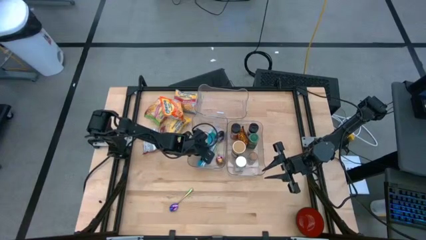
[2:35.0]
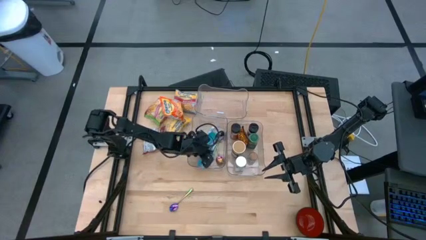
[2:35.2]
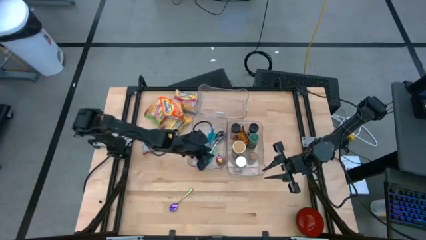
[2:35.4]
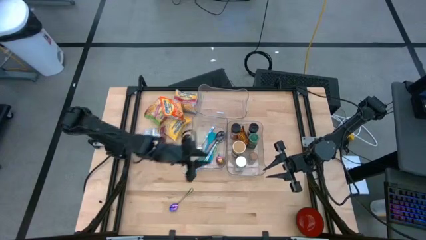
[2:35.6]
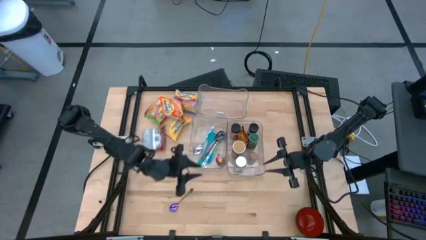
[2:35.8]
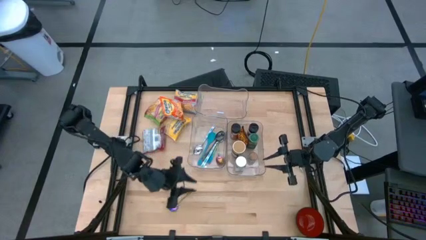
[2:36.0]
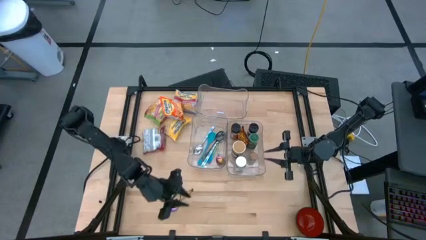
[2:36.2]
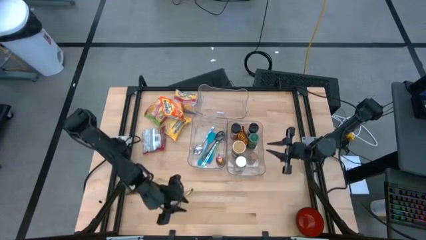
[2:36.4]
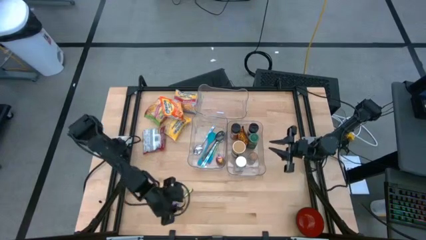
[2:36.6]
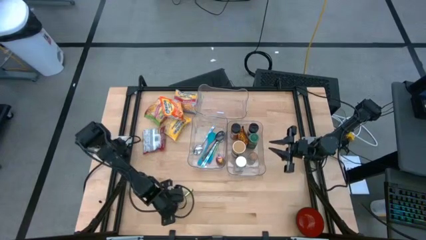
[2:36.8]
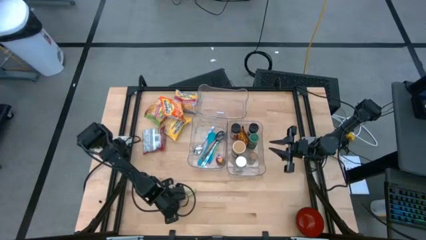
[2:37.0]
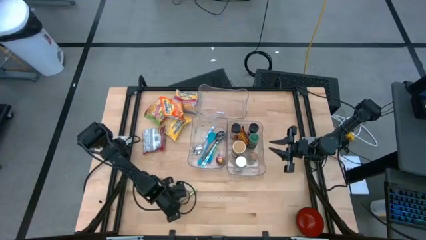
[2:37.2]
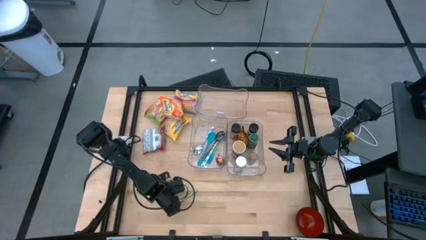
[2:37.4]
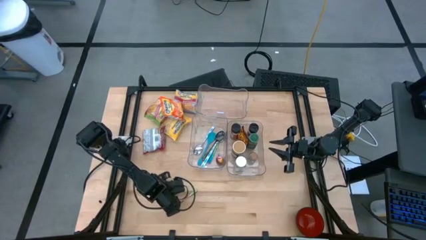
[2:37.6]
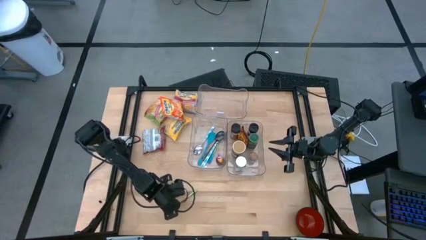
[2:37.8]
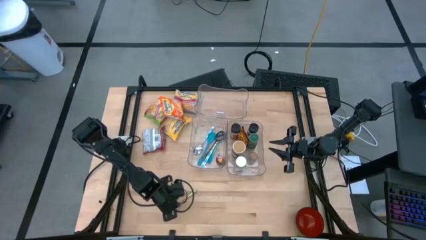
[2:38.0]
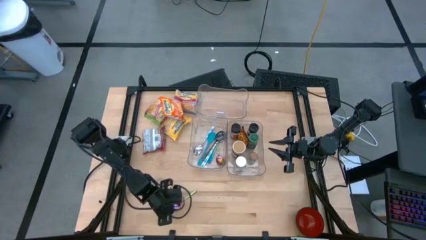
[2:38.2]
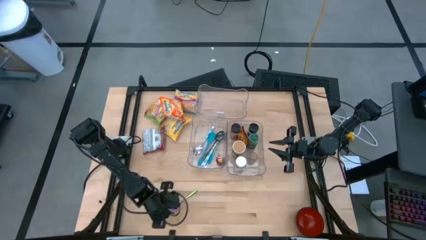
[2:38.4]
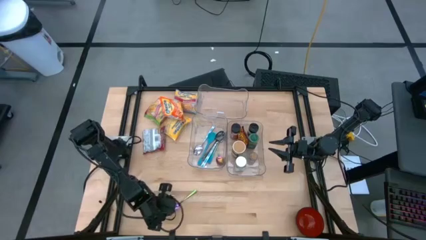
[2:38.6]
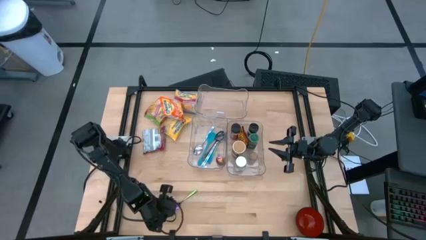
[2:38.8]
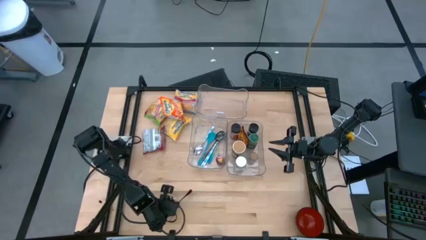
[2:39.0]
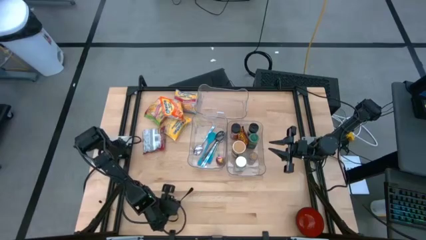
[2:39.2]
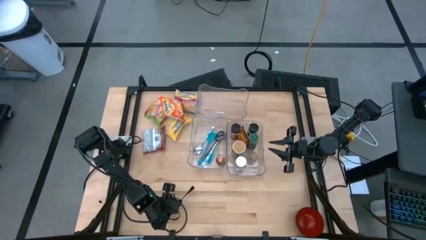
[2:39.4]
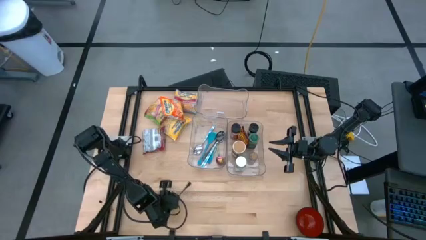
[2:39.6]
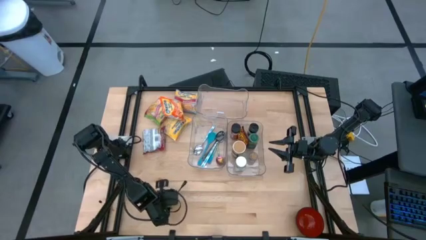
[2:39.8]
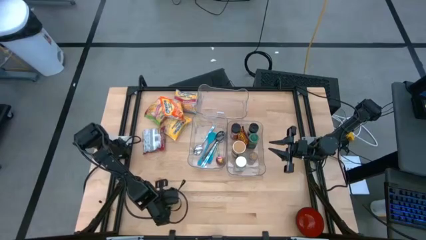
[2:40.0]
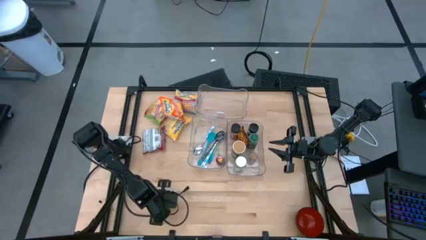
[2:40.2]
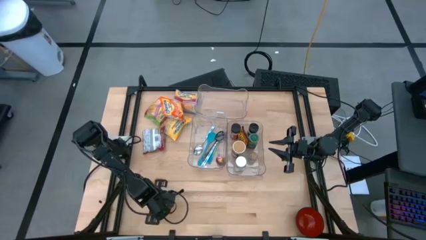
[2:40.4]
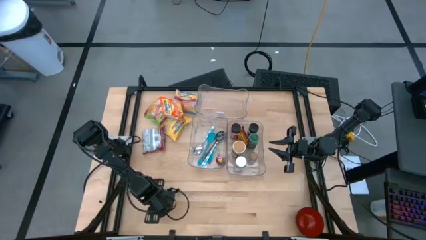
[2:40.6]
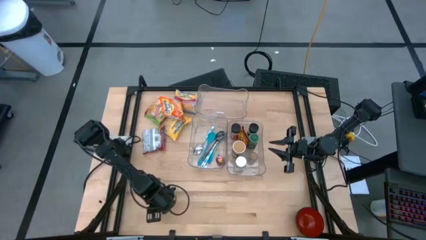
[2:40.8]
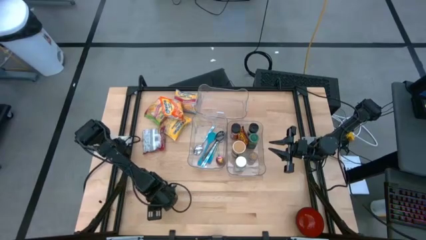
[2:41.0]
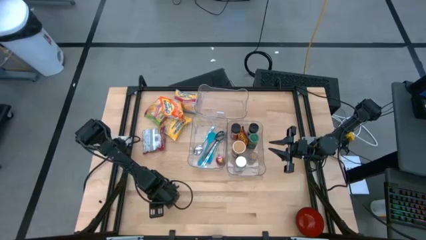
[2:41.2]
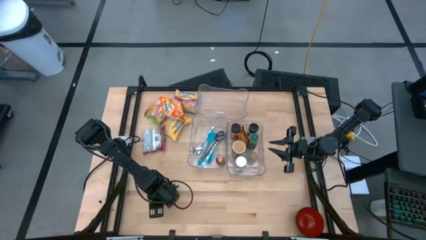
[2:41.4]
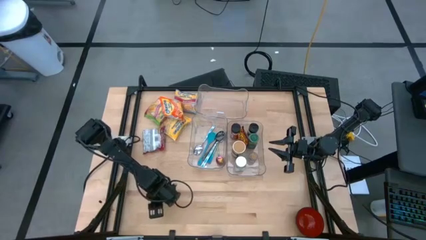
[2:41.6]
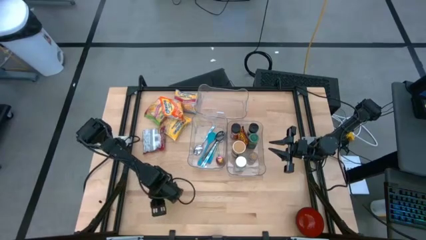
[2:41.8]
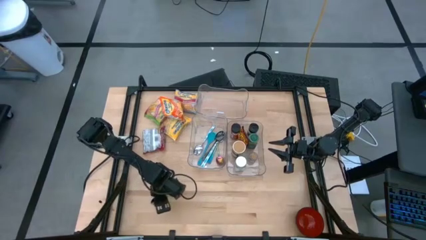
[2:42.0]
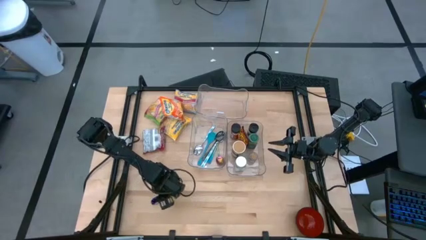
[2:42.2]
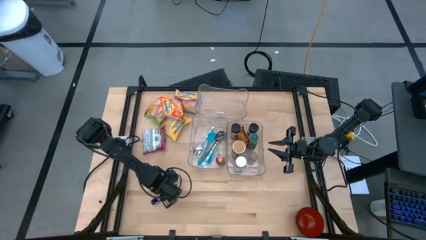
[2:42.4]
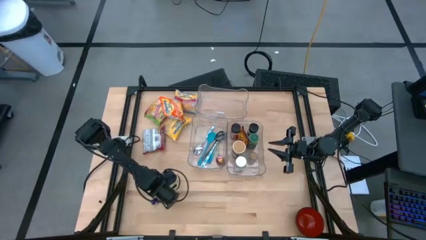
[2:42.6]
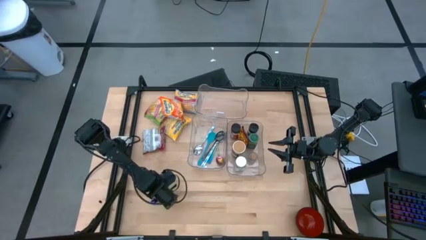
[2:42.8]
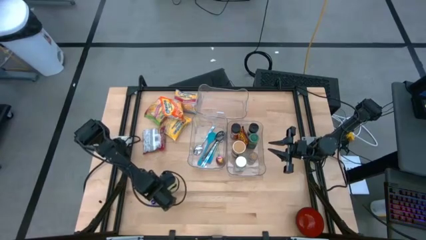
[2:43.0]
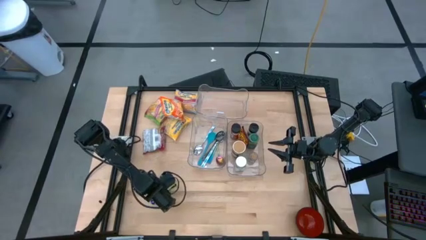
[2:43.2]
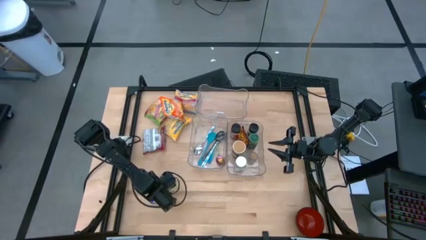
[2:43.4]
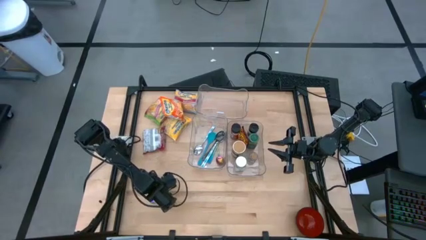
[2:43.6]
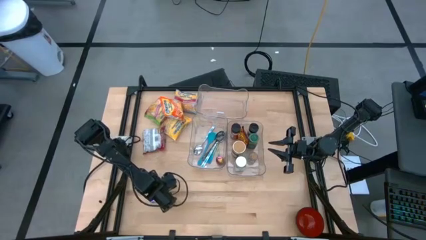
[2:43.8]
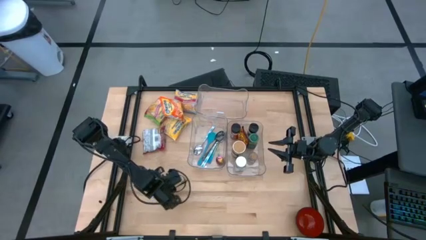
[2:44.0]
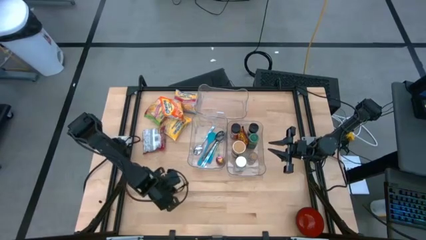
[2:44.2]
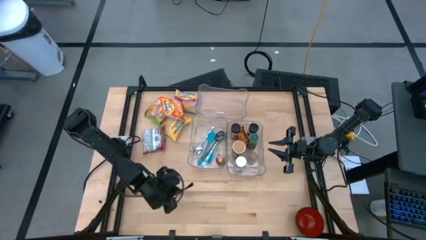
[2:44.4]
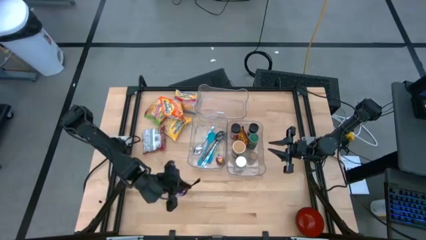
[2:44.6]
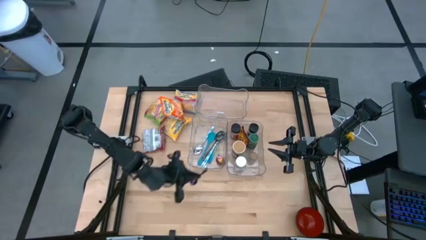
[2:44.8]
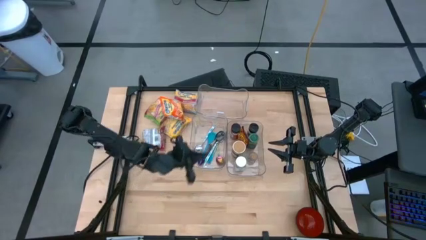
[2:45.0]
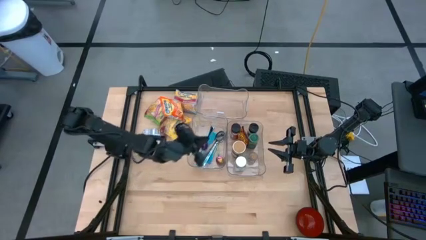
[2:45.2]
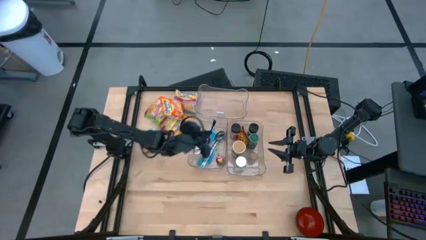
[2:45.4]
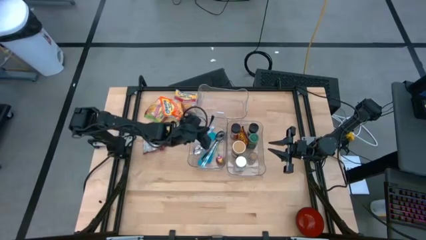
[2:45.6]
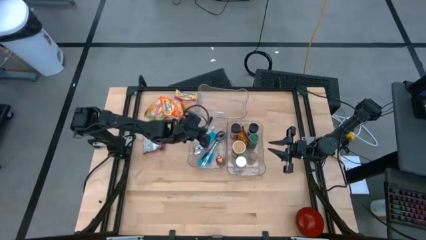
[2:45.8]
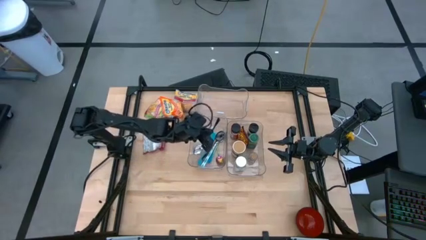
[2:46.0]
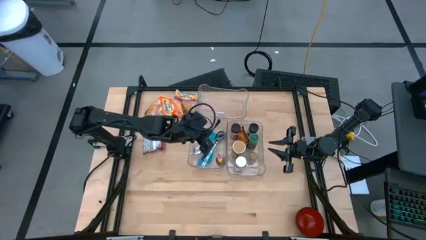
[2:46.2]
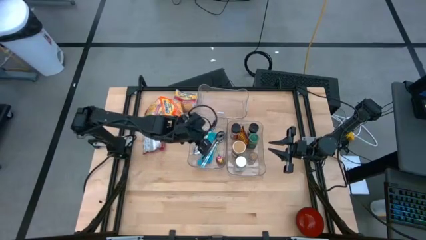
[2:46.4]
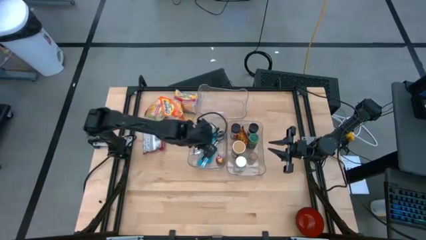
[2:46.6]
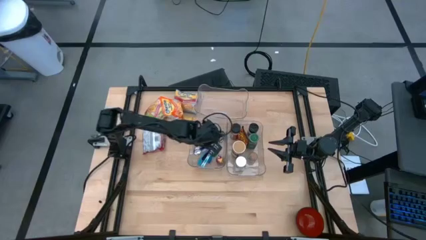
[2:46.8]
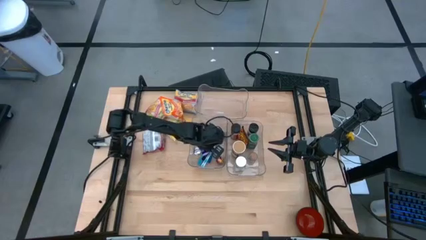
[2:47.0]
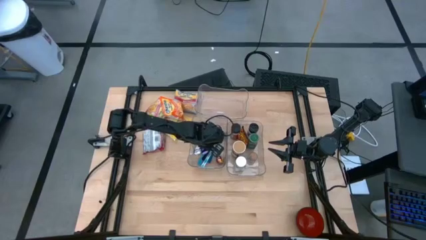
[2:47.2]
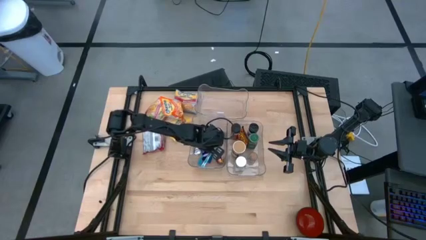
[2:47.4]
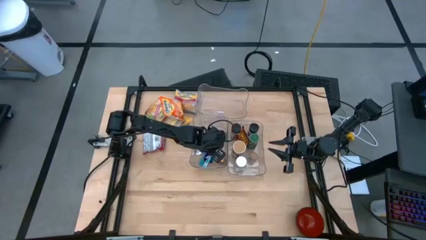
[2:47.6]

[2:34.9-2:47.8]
Task: Pick & Place Food Item
Put the blue green spoon into the bottom left transparent bin

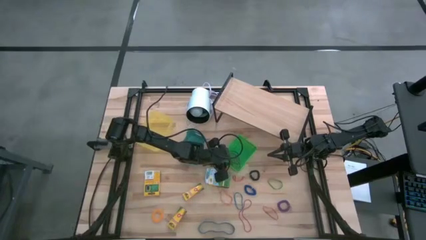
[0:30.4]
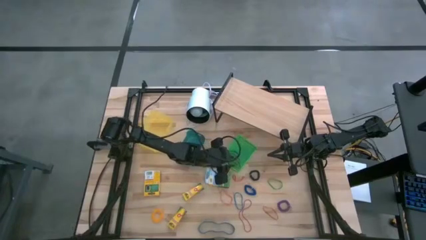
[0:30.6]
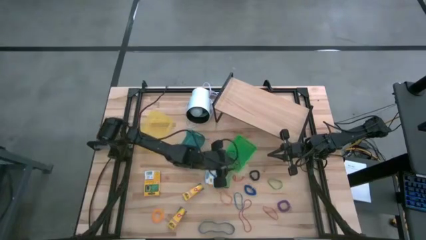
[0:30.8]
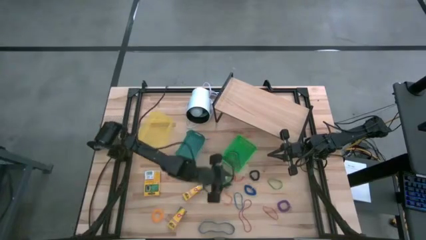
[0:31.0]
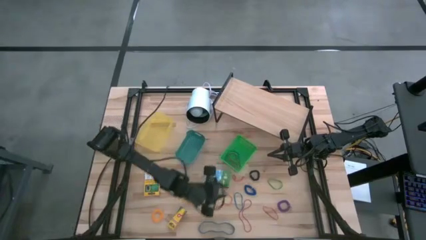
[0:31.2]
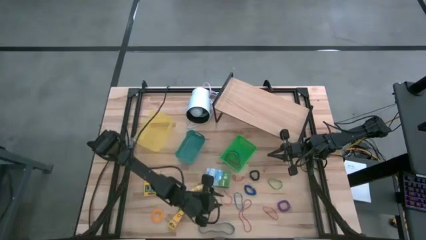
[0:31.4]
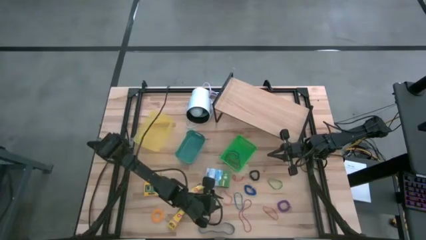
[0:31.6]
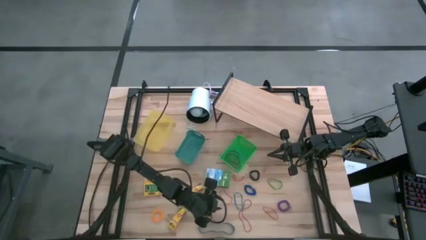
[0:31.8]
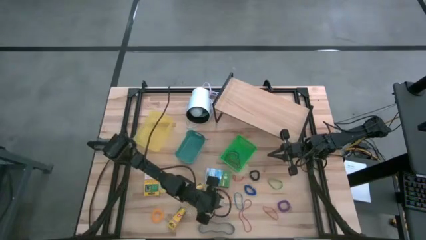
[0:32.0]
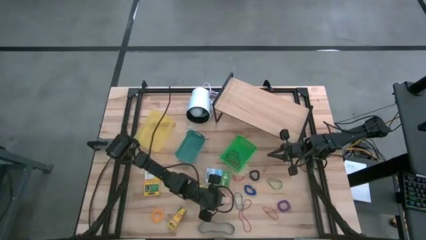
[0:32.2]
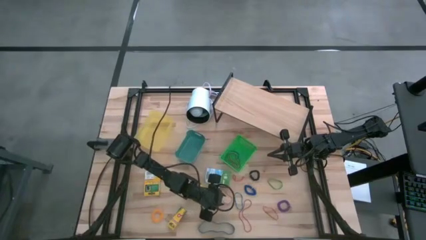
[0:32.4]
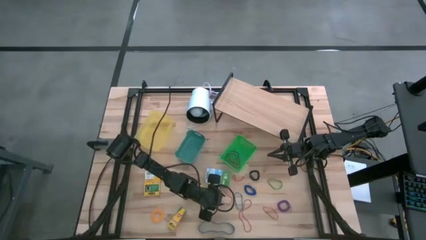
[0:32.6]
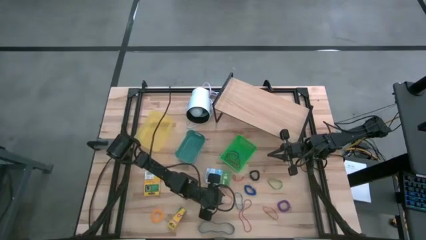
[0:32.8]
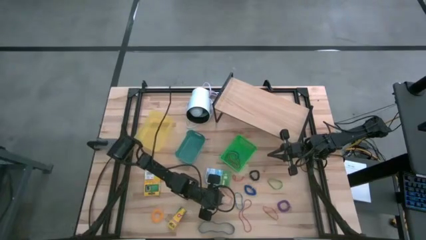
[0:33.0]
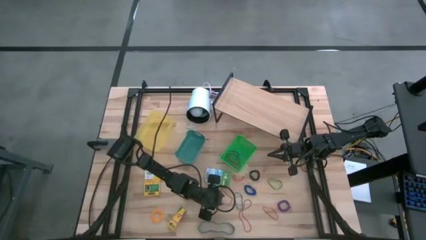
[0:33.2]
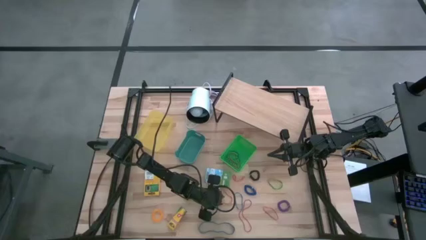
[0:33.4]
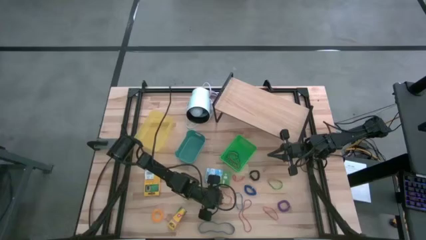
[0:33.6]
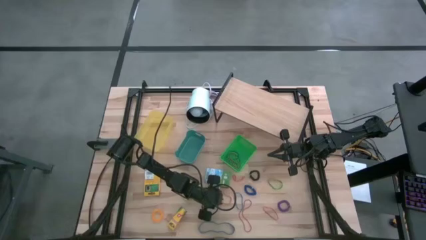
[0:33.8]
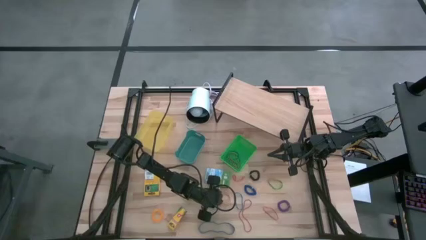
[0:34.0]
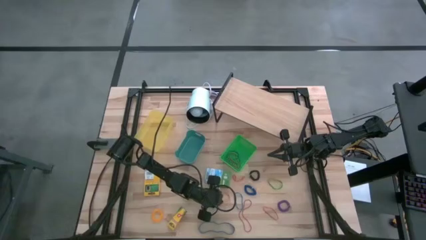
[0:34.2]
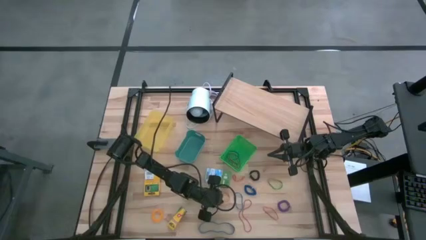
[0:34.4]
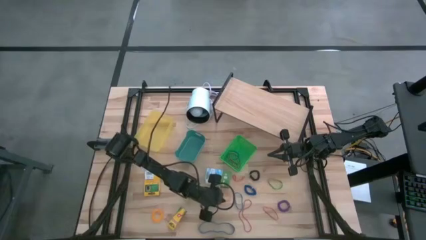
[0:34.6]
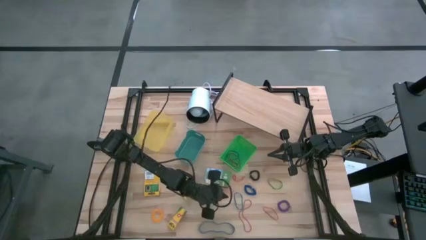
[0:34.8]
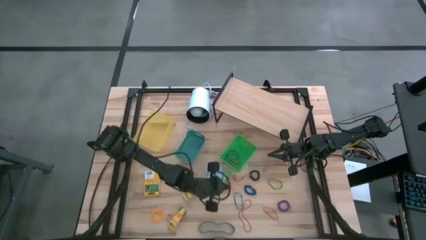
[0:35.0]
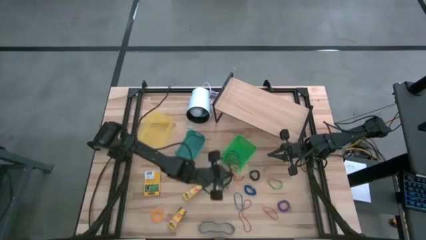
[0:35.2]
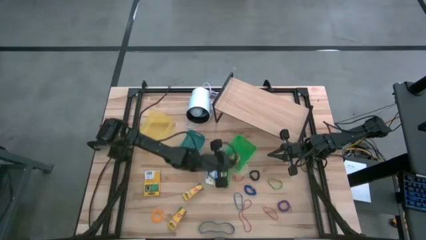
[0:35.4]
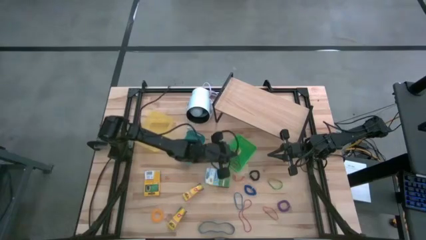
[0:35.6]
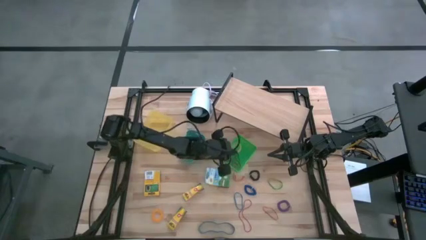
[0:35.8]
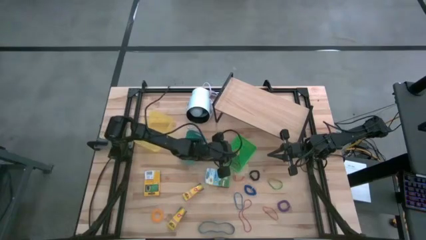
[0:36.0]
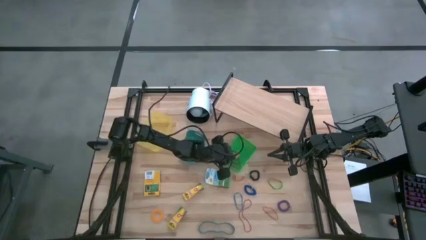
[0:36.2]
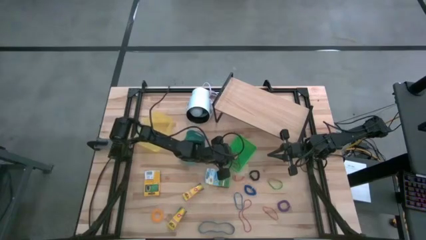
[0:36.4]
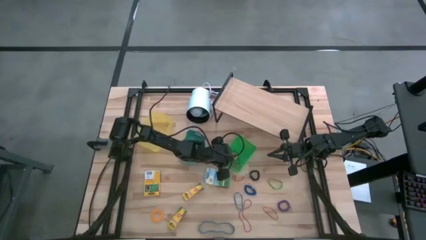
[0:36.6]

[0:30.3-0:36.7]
Task: Pick & Place Office Desk Supplies
Put the left orange rubber band into the green bin
